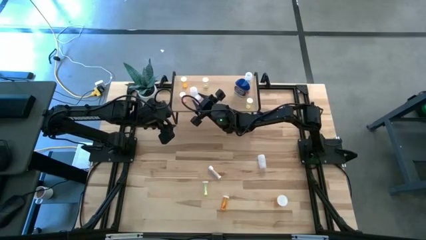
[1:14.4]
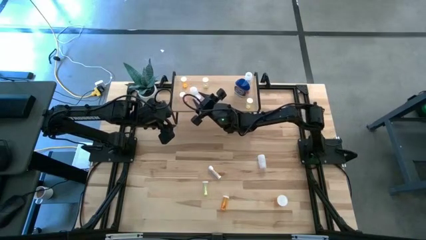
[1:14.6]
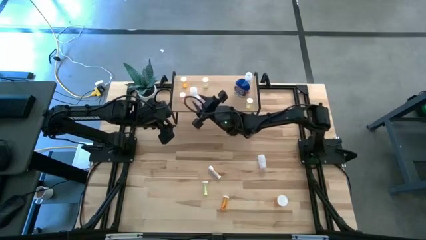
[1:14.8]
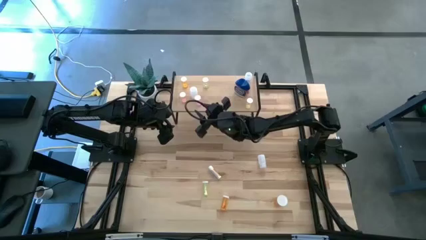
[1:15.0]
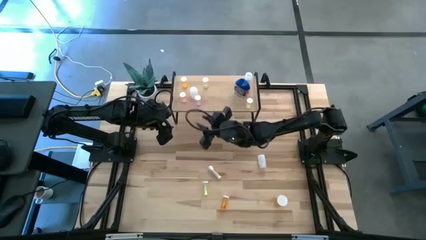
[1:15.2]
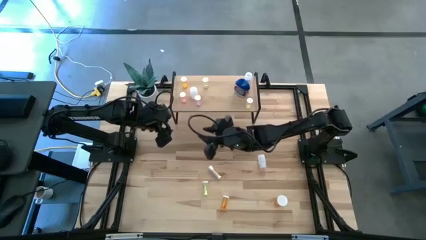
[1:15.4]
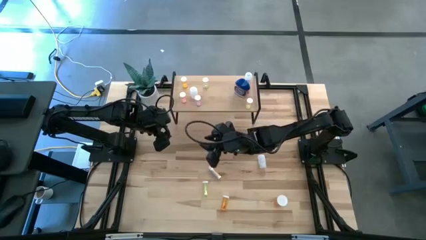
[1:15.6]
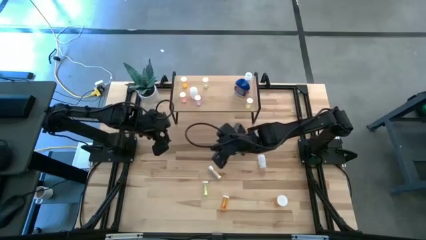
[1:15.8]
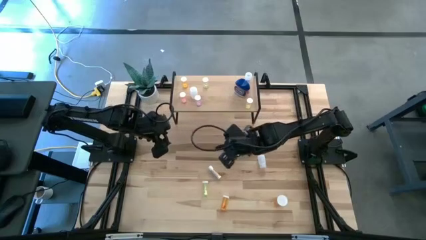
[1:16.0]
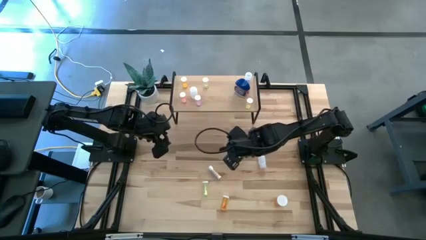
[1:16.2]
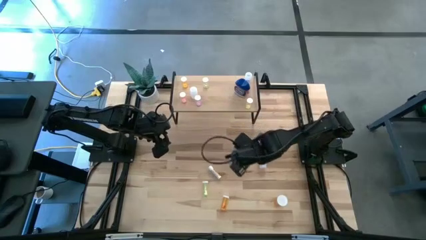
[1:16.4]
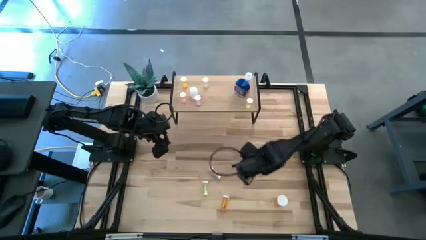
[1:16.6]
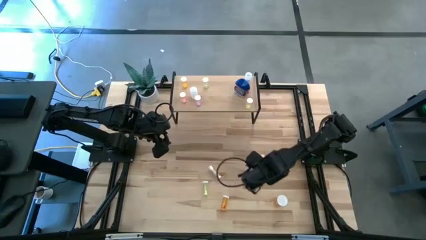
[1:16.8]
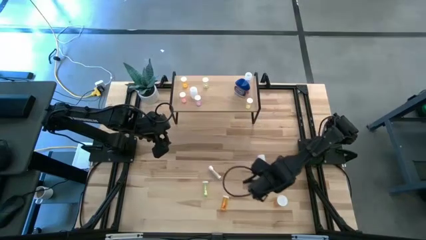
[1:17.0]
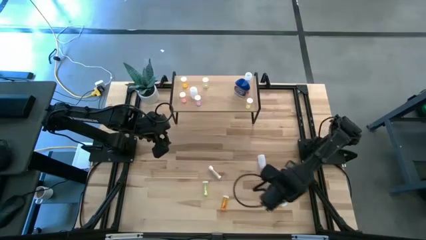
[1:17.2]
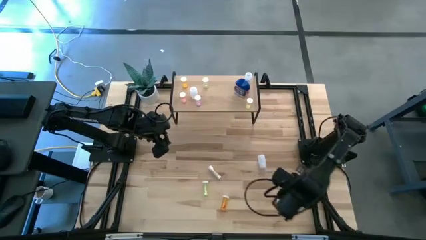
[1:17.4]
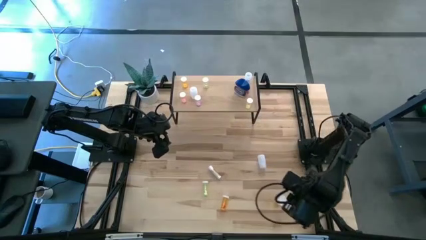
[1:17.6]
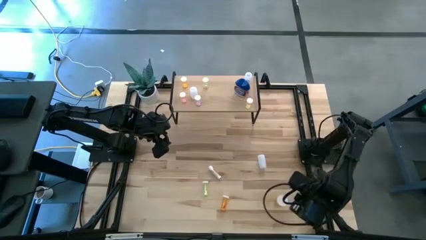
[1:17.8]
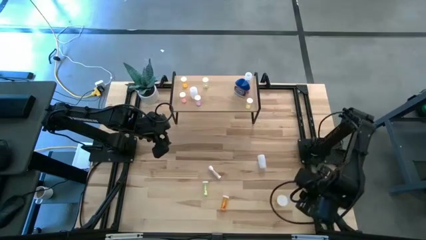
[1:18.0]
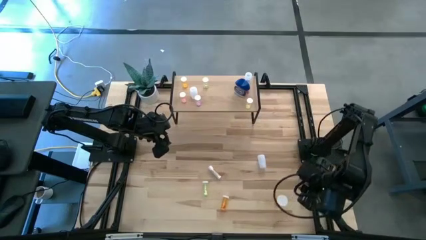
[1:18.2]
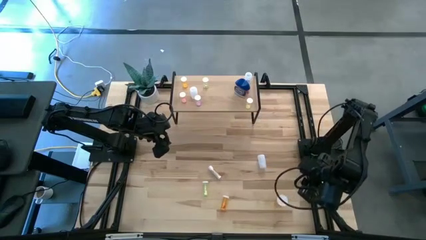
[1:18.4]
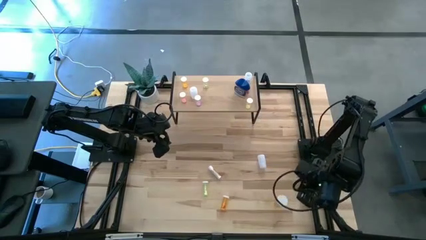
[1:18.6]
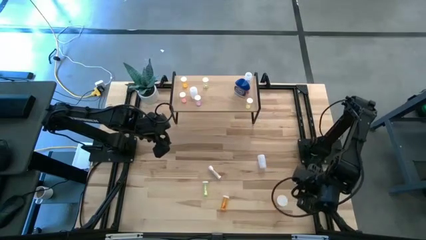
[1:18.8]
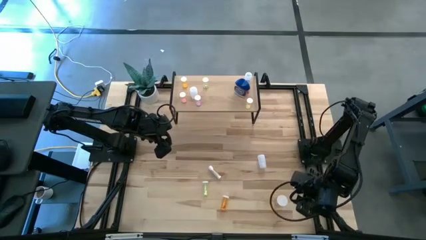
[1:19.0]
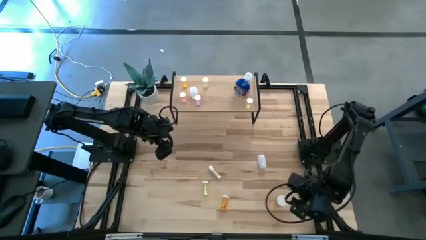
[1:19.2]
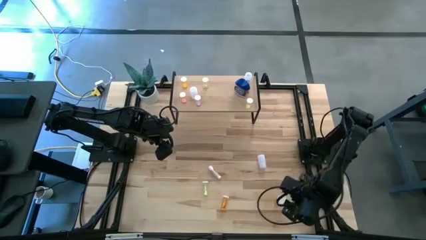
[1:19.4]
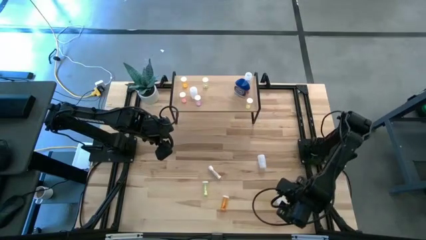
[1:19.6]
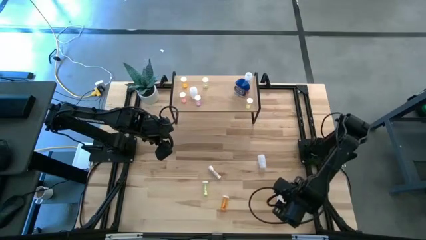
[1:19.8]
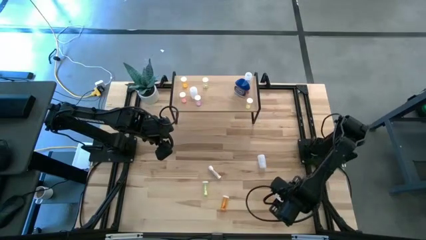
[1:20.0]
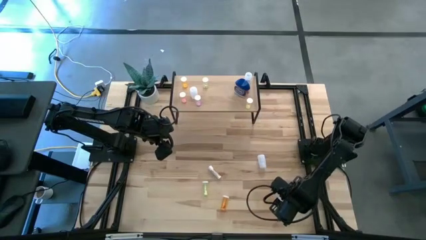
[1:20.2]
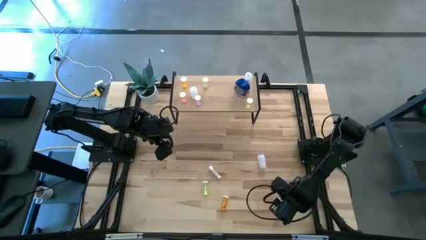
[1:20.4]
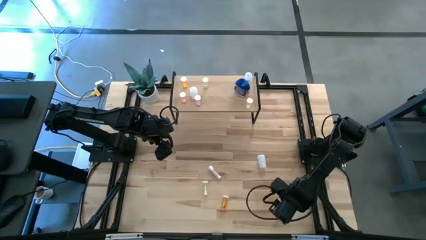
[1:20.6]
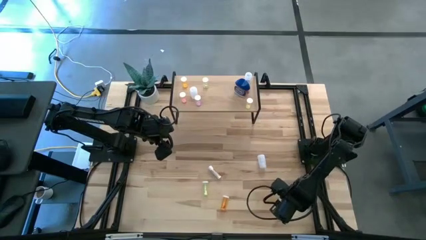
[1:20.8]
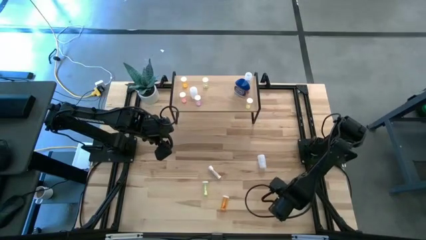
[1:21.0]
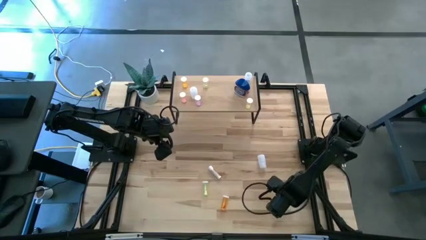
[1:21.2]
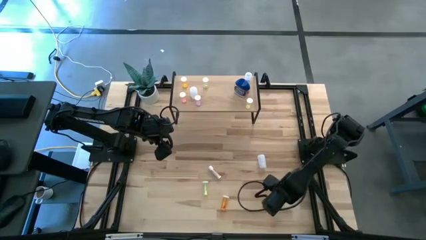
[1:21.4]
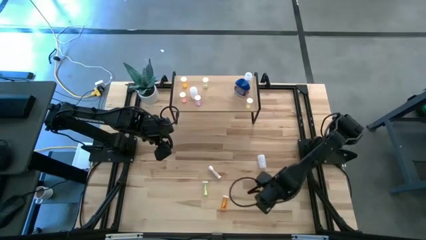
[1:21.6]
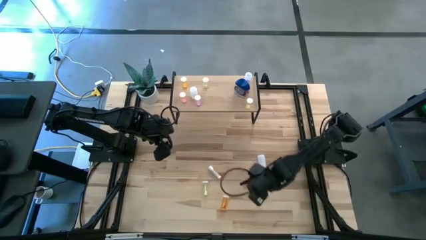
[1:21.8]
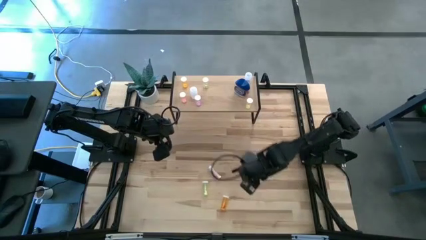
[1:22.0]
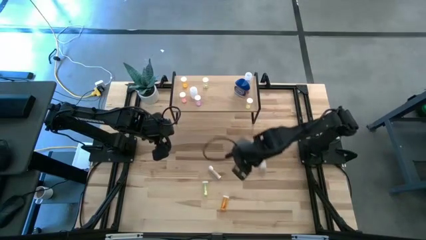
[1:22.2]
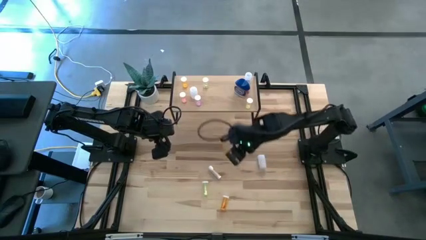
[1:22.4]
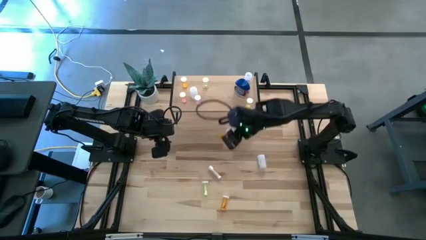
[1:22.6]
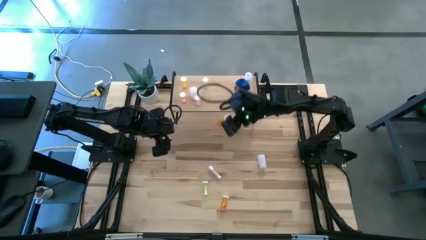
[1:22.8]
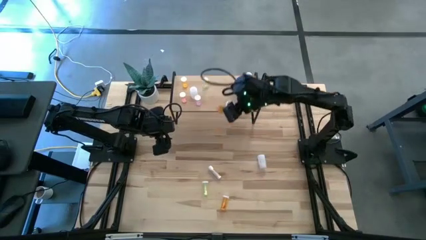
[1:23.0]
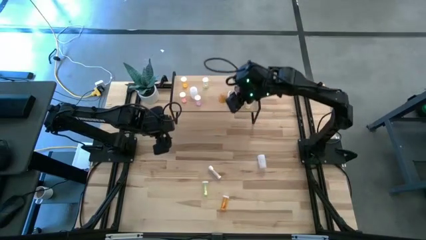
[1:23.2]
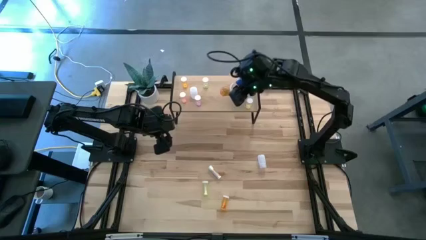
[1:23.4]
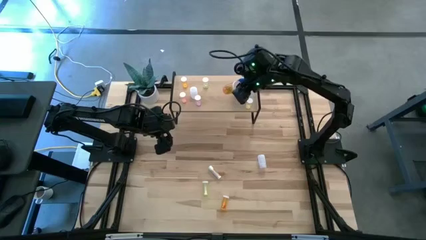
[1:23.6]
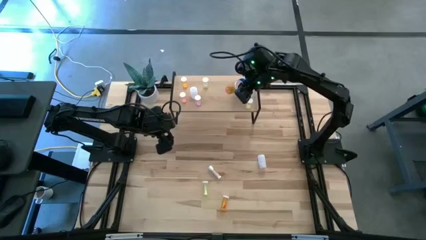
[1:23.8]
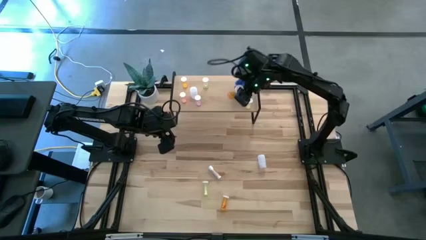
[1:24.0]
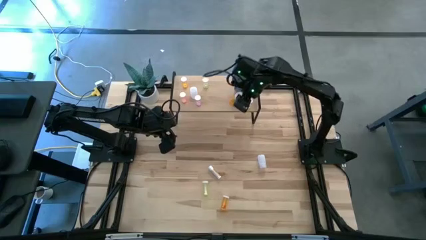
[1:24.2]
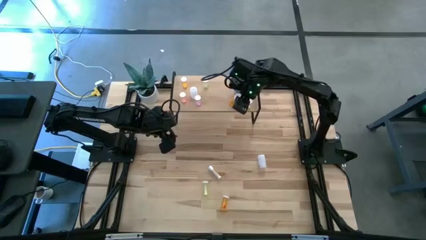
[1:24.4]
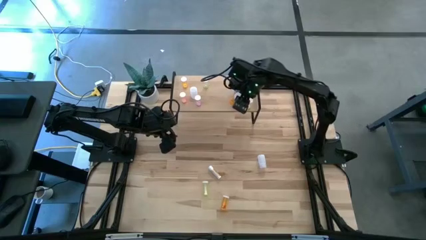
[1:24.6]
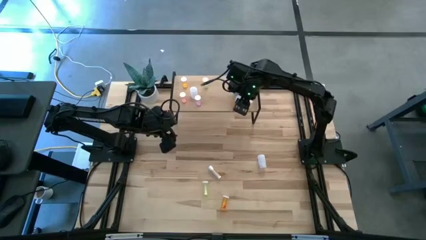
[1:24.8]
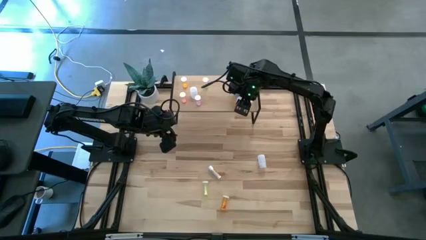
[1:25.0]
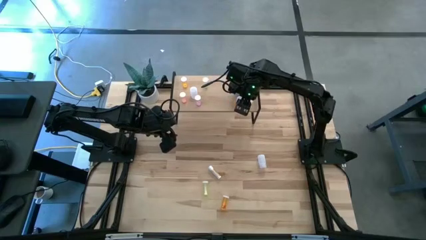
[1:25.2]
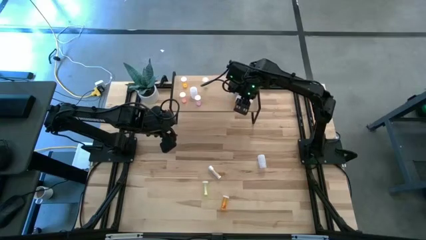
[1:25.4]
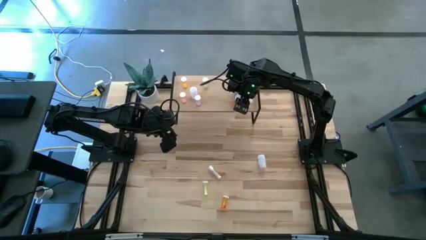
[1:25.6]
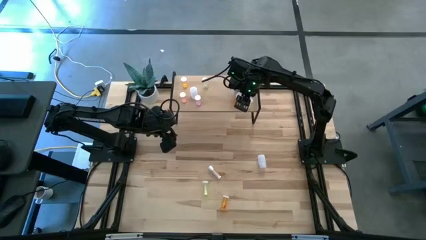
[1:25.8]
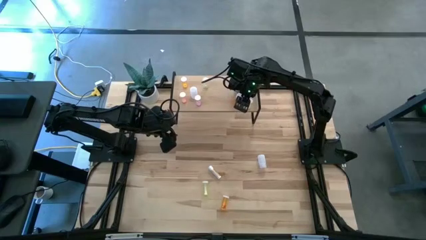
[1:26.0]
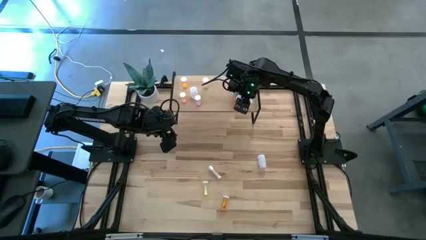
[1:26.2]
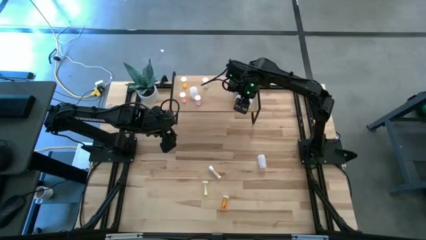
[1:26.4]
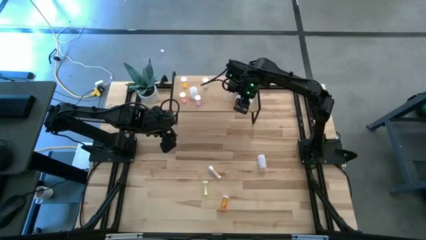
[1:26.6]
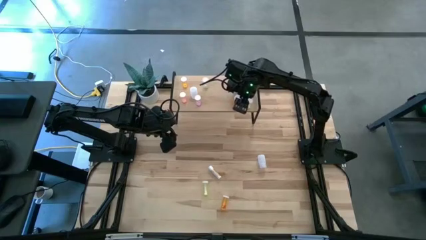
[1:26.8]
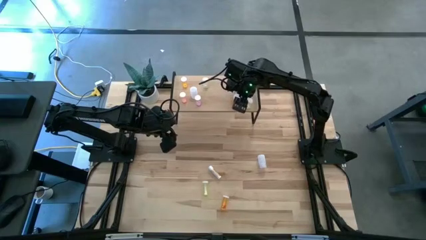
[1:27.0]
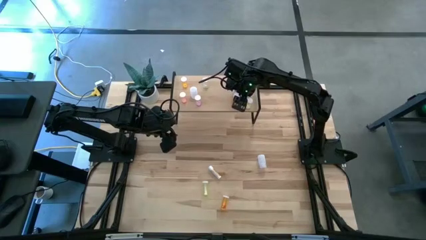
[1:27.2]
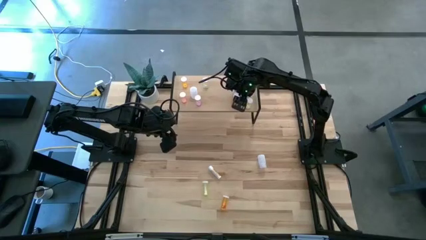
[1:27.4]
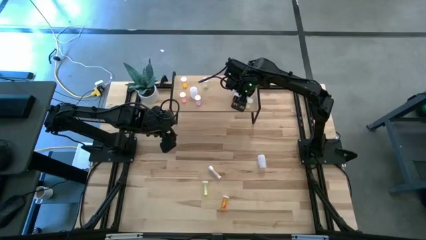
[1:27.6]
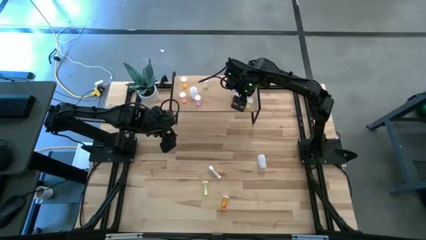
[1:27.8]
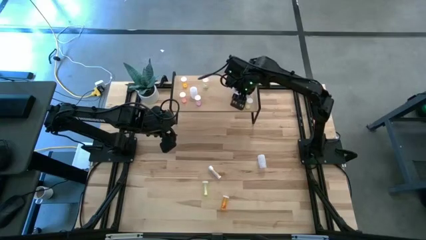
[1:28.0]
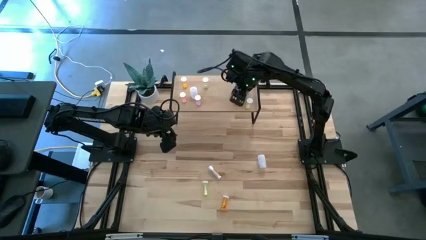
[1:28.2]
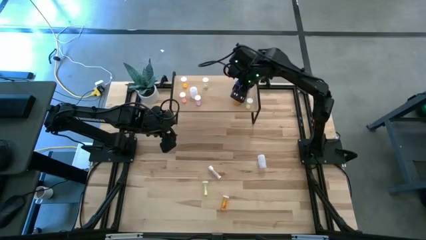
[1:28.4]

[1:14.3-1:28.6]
Task: Pick and place medicine bottles onto shelf by color
Put the large orange pill bottle on the shelf

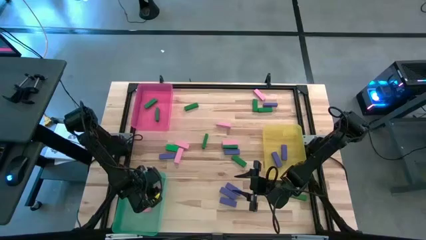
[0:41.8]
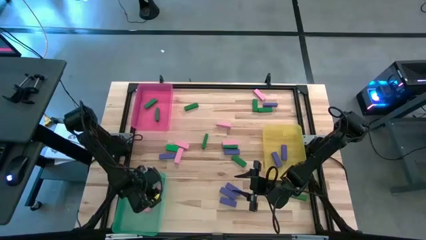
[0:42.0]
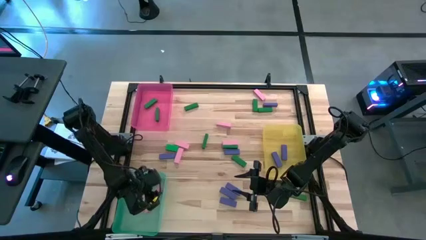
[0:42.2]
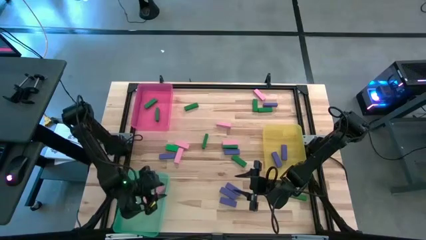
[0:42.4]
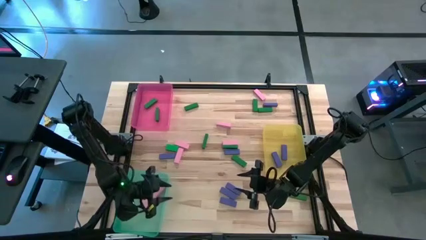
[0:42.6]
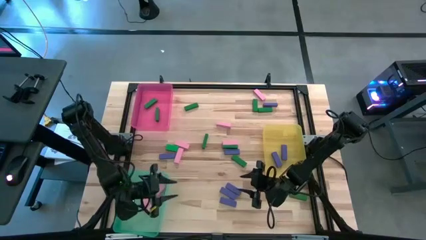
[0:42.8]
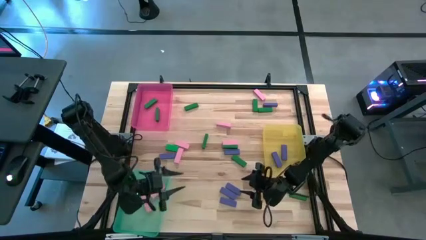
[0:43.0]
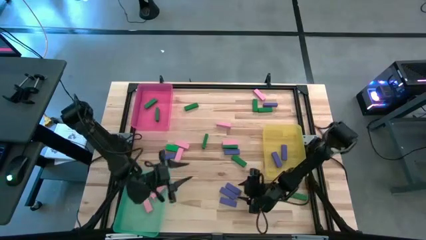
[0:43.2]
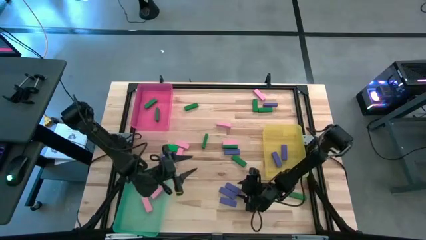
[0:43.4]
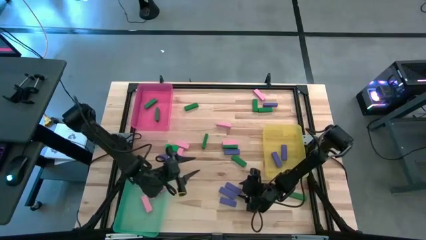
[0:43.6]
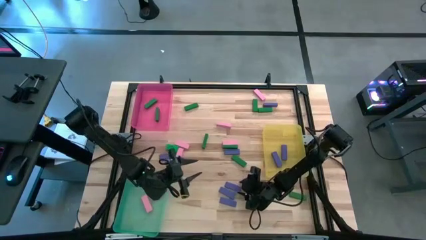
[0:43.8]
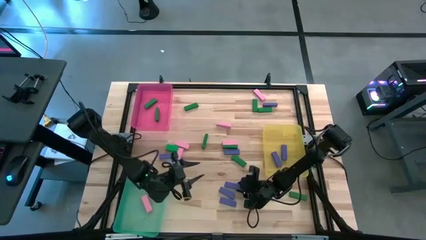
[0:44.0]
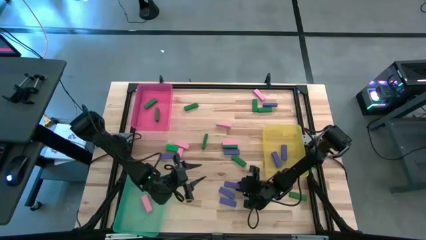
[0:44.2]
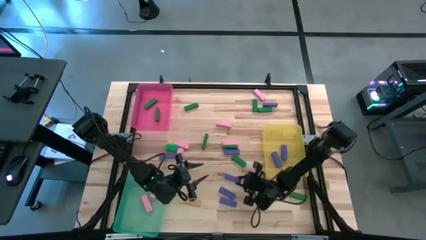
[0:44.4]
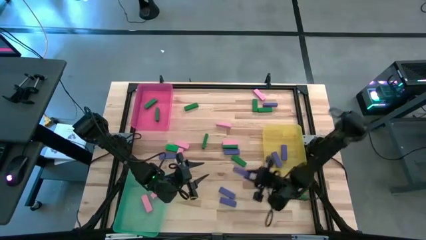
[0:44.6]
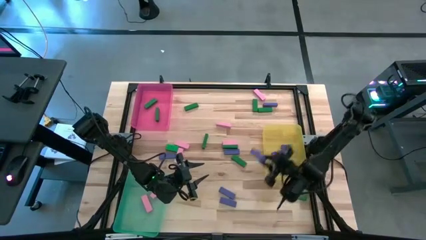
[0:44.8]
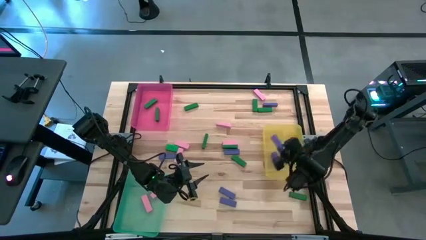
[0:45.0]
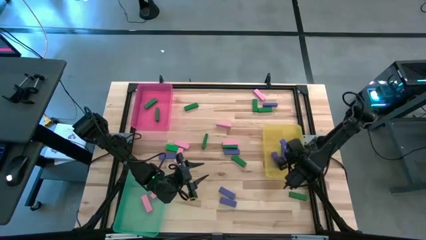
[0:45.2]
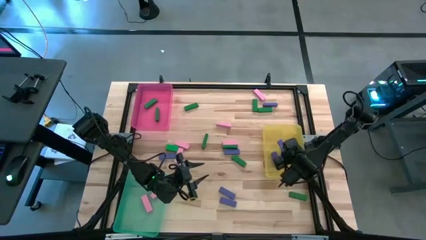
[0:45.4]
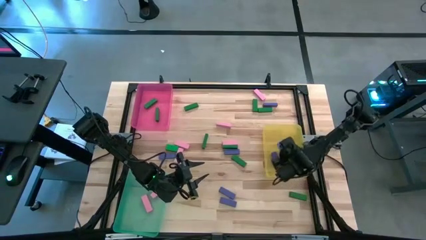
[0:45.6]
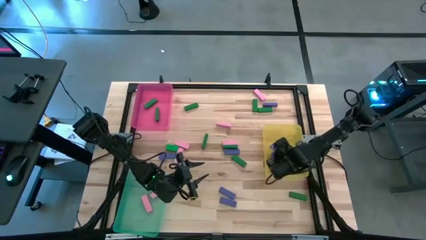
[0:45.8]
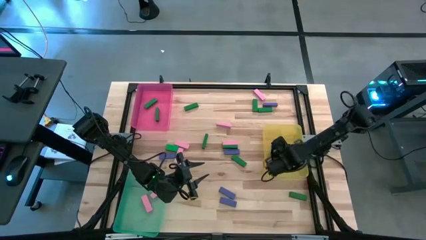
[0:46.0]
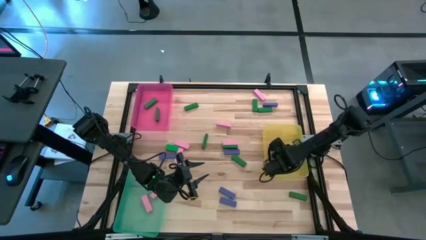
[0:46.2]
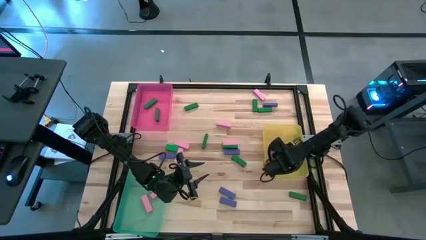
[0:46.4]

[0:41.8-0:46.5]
Task: Sort blocks
Put the blue block into the yellow bin
